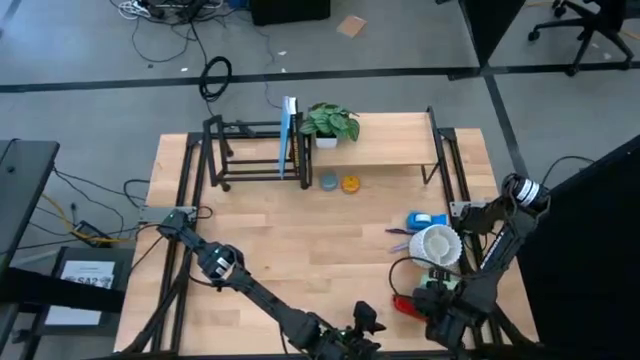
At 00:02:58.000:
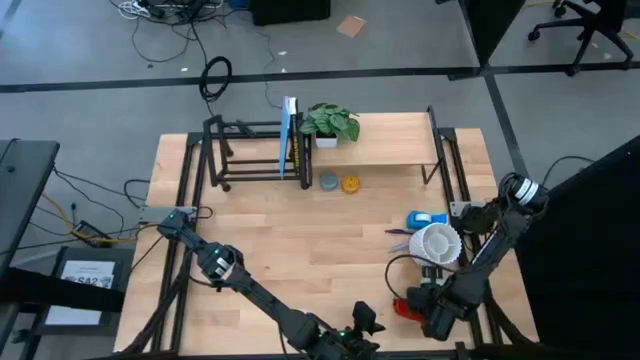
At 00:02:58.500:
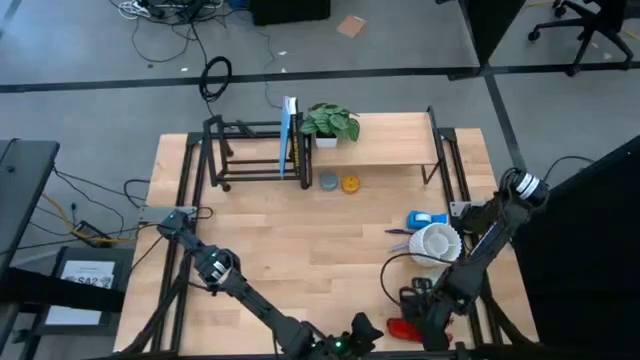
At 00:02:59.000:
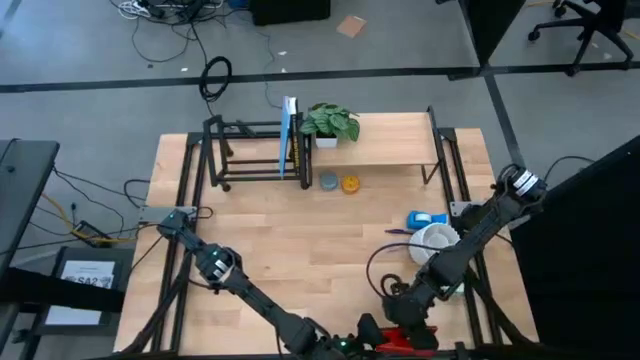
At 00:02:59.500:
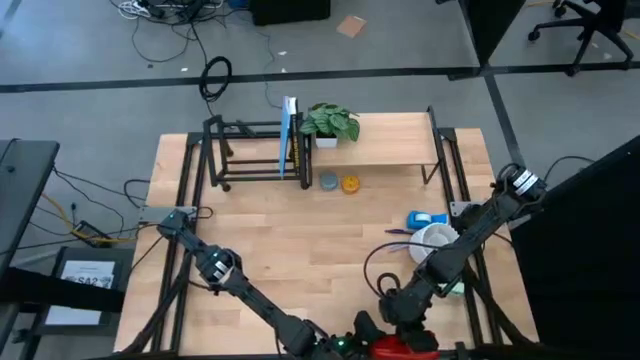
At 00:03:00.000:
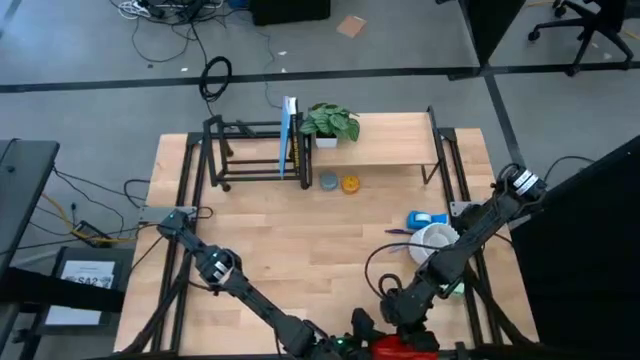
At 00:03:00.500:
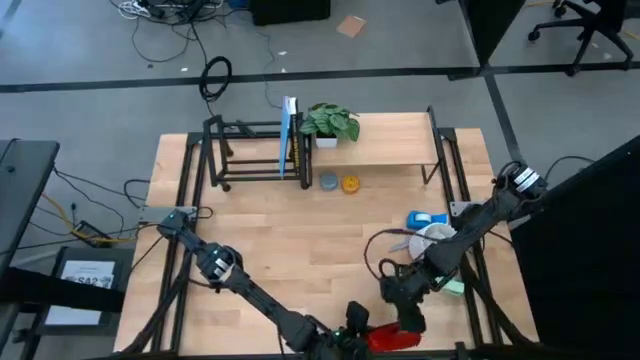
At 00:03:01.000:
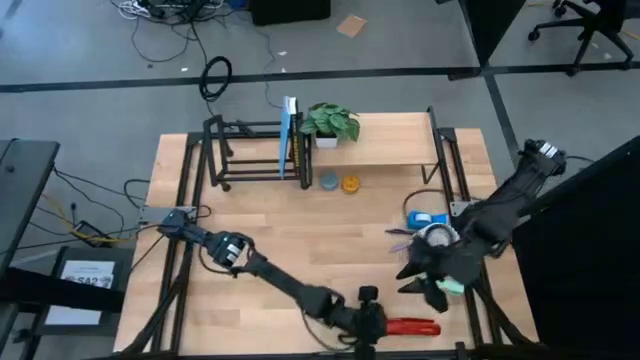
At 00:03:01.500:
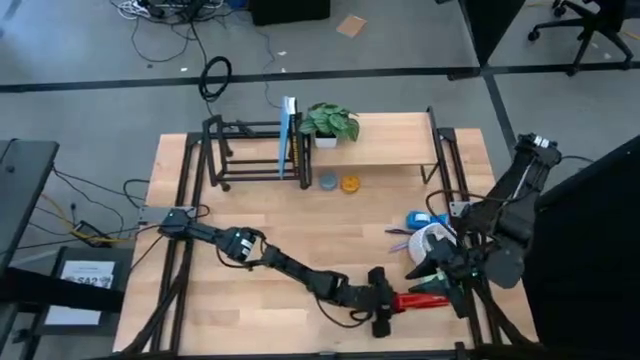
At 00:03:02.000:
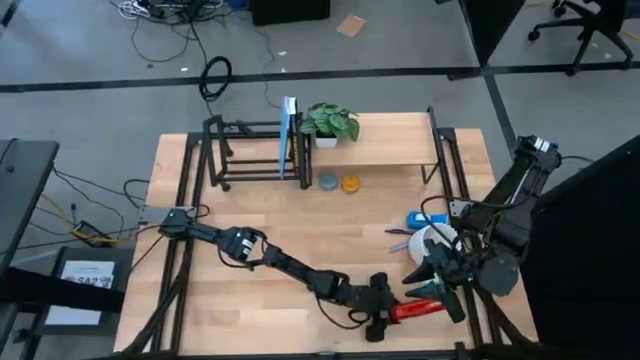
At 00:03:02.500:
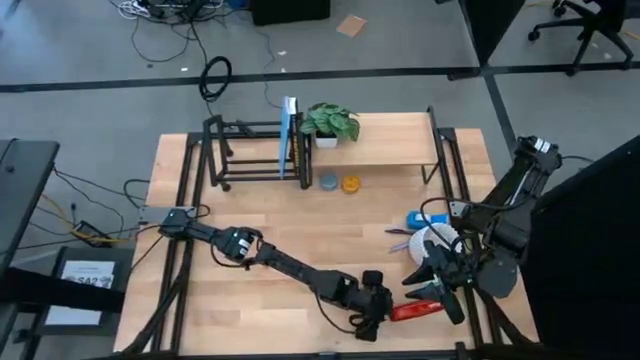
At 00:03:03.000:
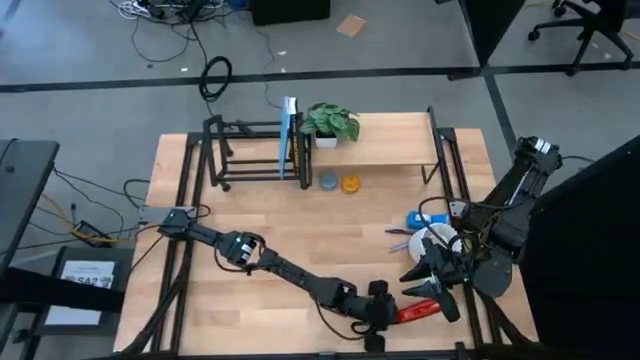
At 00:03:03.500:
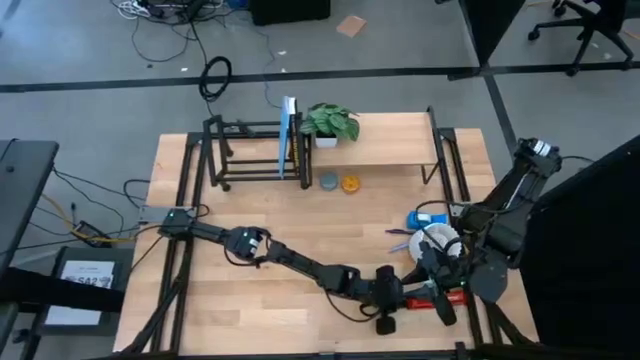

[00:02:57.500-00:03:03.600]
Task: Stock shelves
Remove the red stapler from under the shelf

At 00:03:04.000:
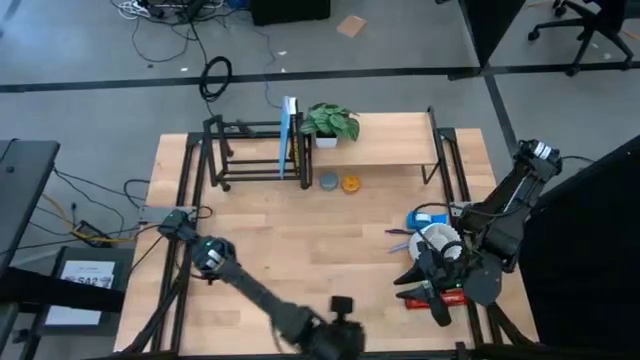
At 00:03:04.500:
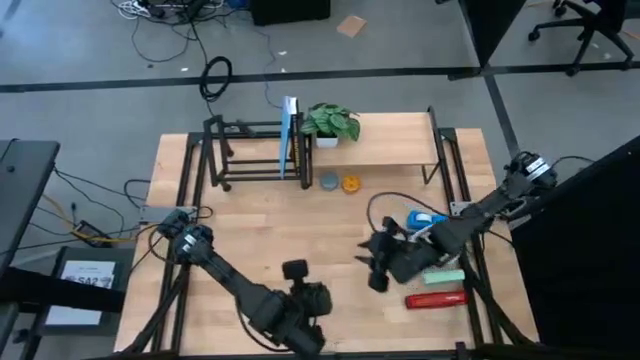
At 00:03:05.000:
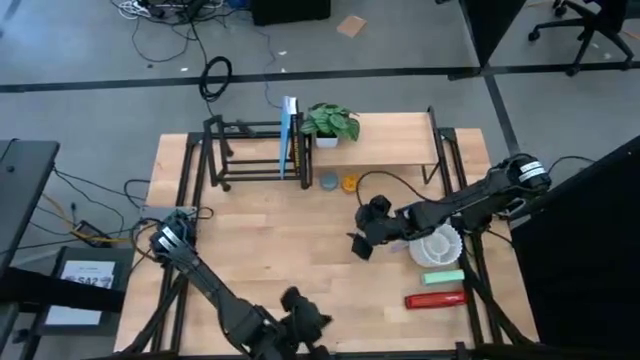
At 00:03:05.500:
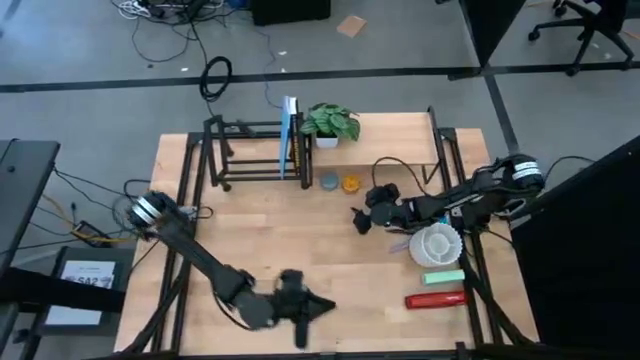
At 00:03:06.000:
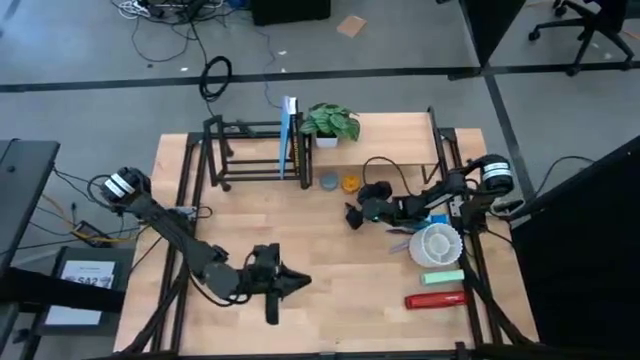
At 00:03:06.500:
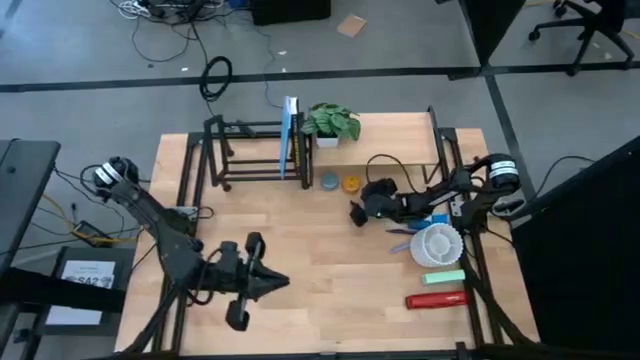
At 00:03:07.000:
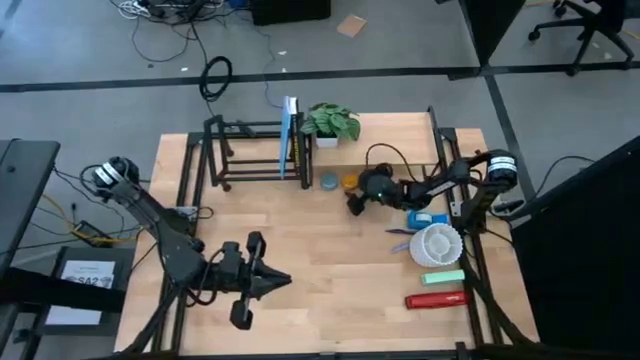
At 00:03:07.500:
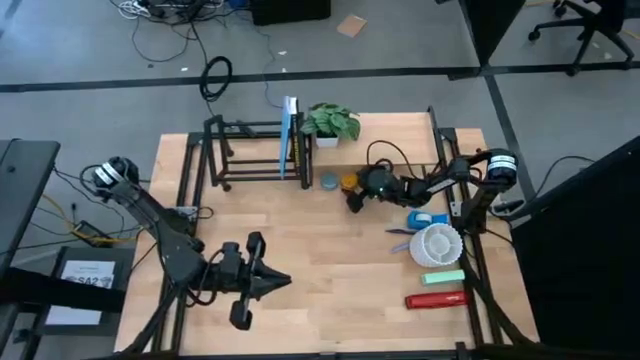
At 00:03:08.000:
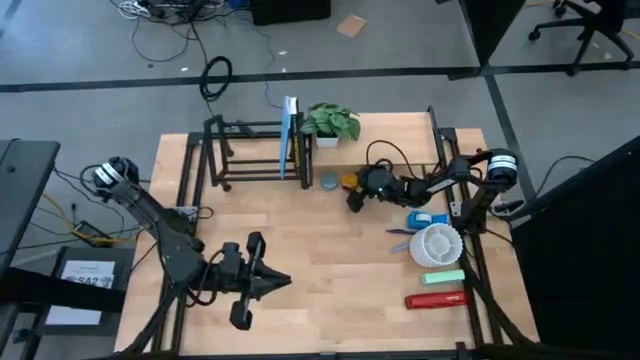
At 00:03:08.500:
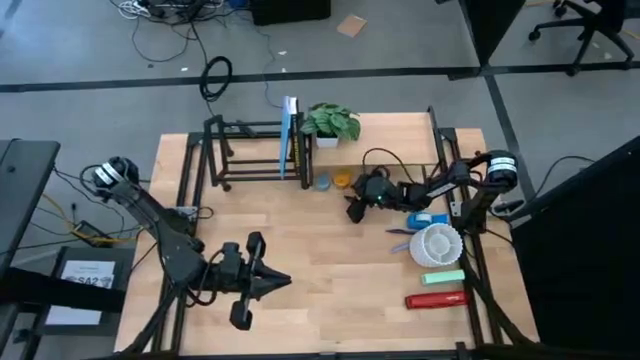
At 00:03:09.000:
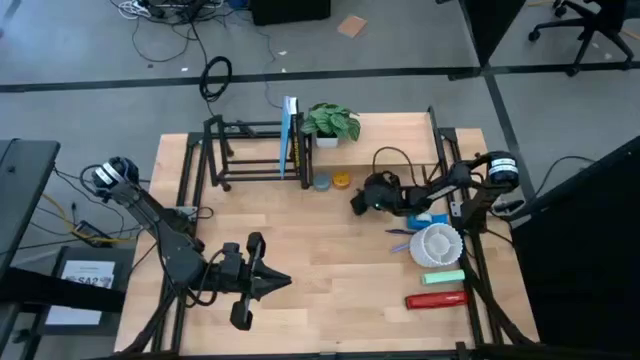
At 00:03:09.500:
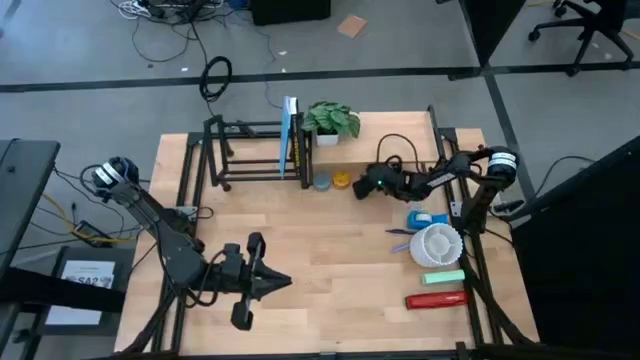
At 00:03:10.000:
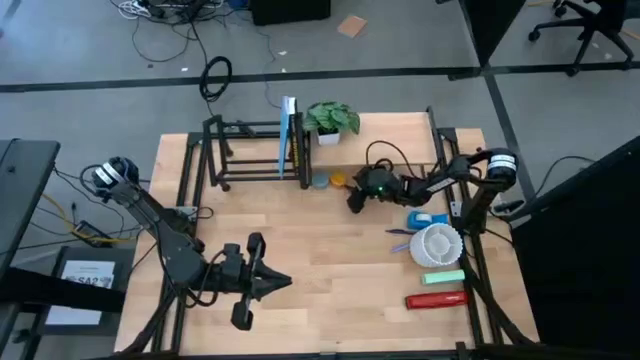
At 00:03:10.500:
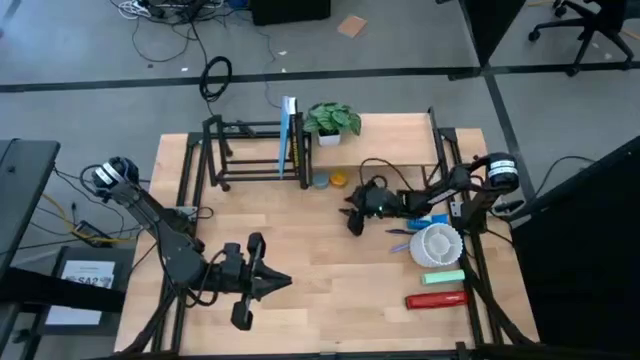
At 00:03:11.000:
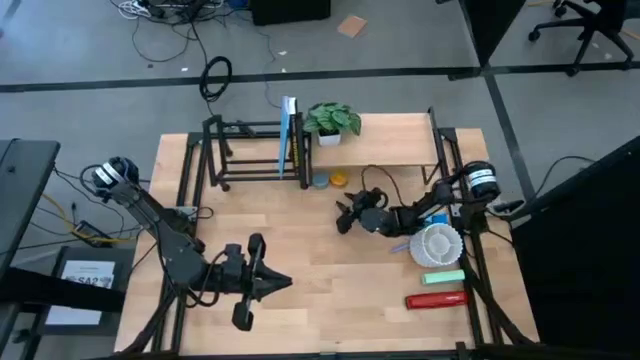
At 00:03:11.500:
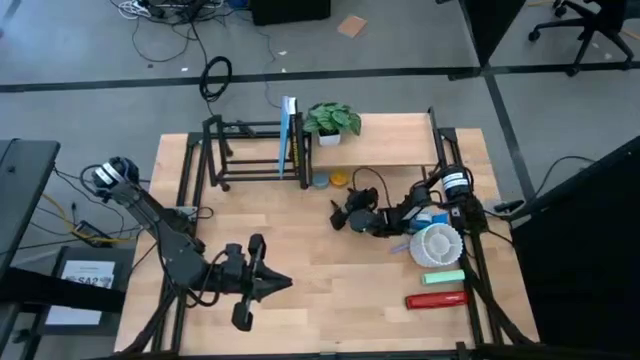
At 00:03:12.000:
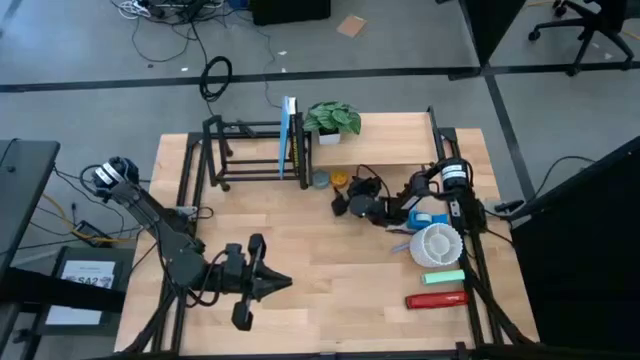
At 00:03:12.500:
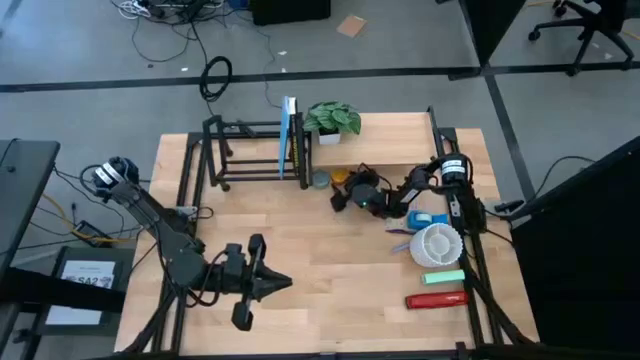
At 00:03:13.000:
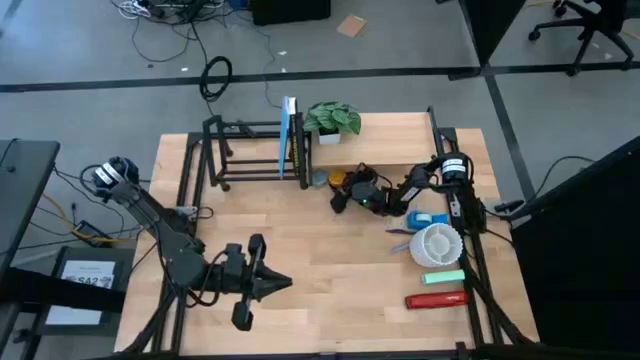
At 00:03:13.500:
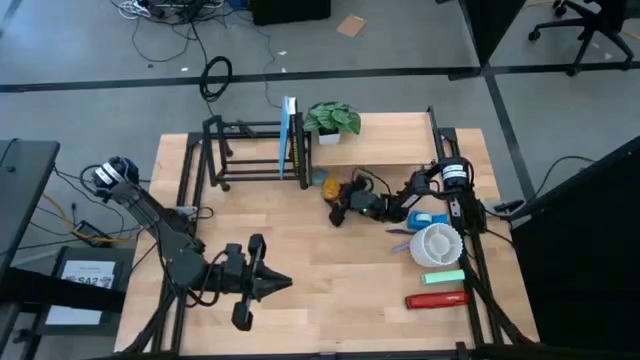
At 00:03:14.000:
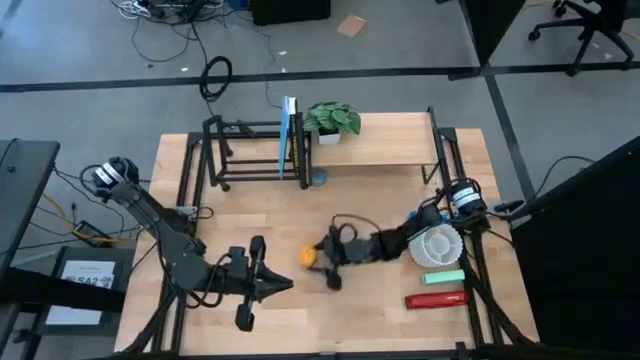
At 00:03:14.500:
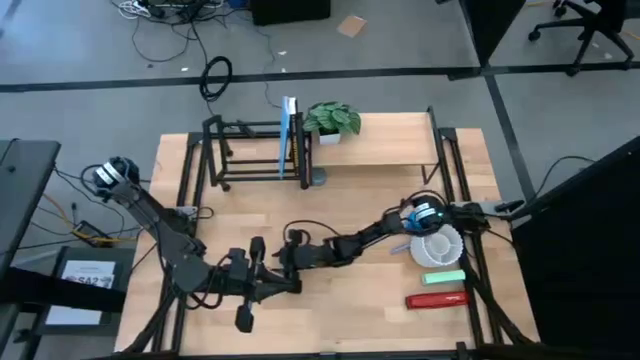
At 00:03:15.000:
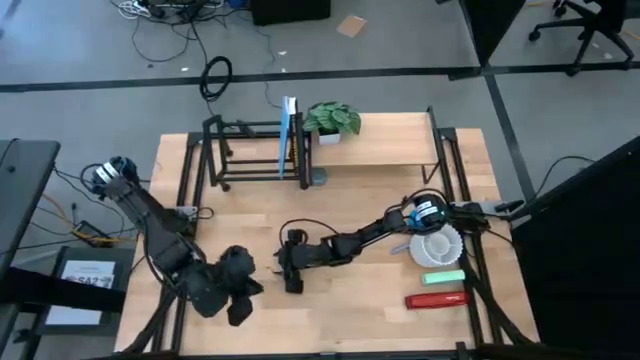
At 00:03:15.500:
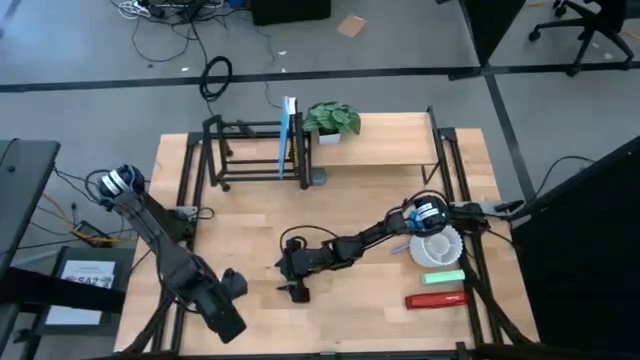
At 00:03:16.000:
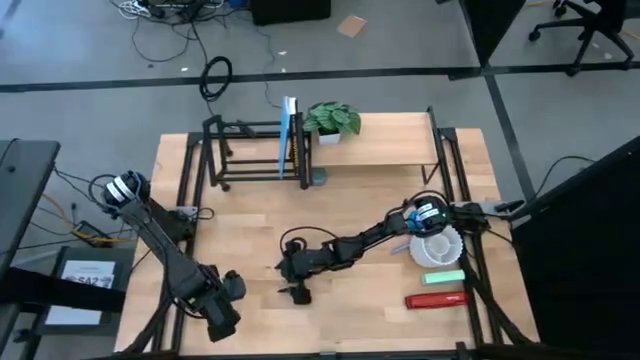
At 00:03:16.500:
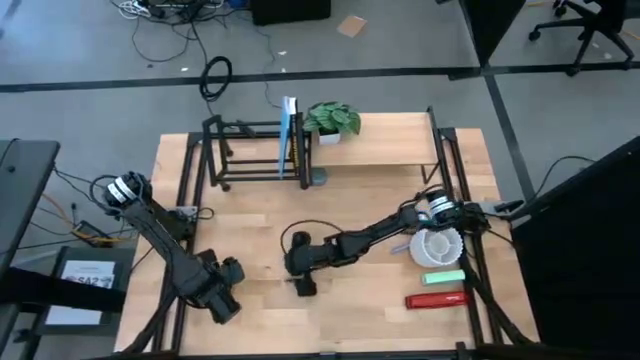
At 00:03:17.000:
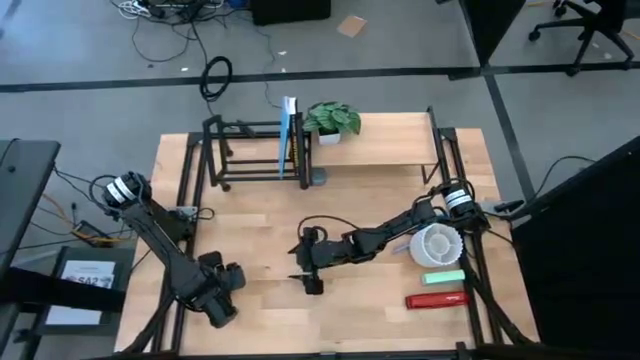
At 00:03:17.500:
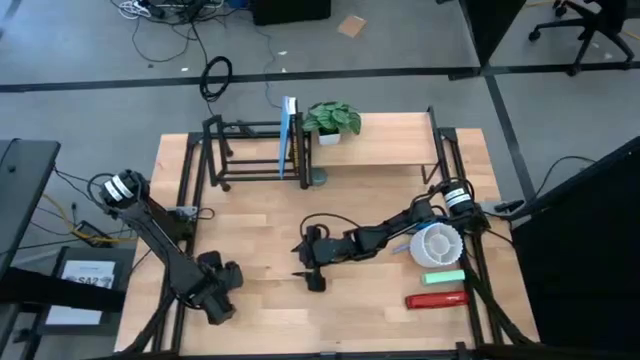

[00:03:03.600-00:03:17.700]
Remove the yellow scented candle from under the shelf
